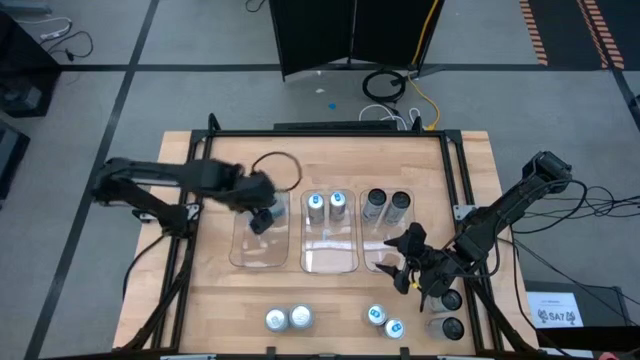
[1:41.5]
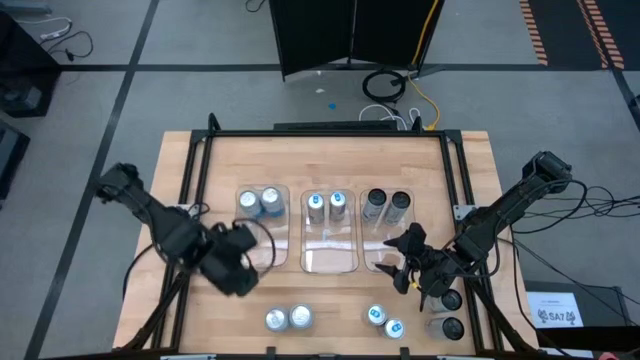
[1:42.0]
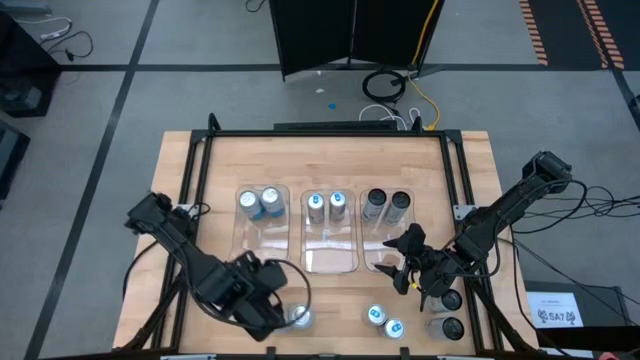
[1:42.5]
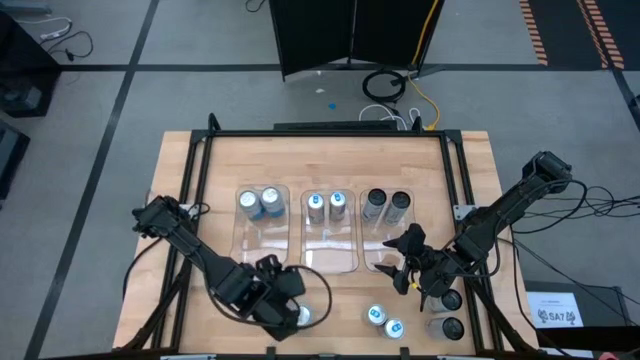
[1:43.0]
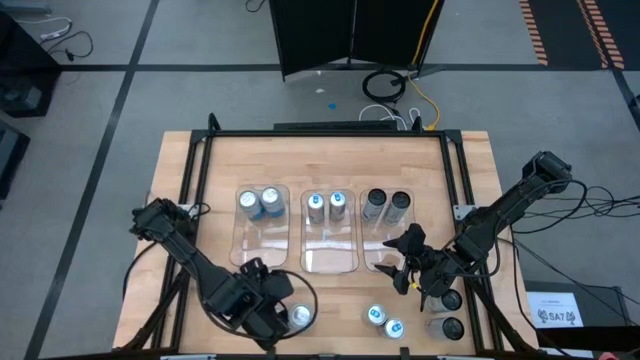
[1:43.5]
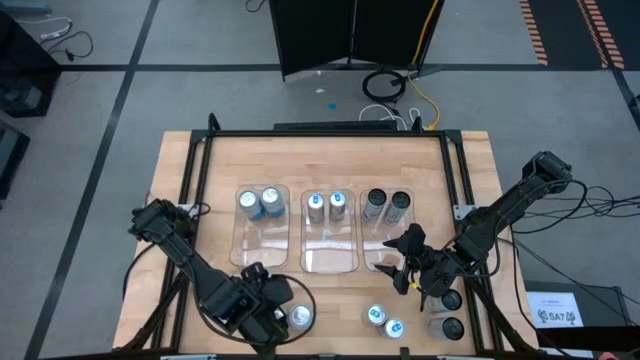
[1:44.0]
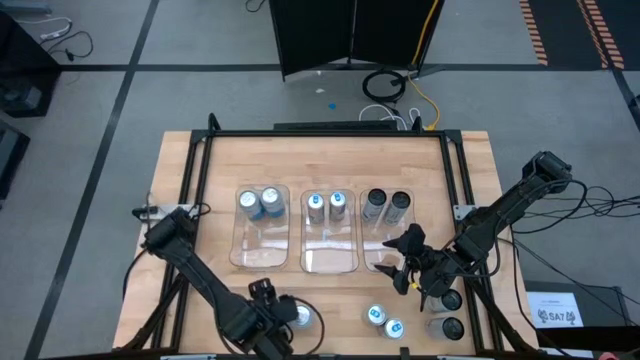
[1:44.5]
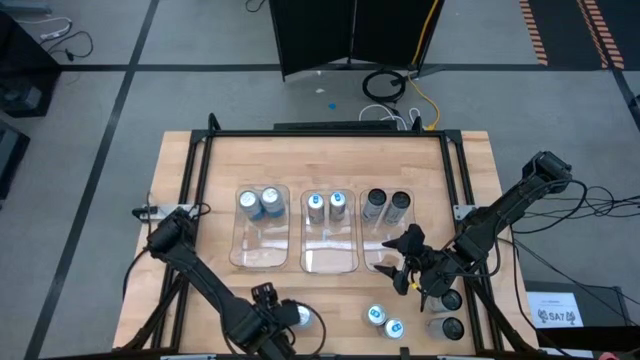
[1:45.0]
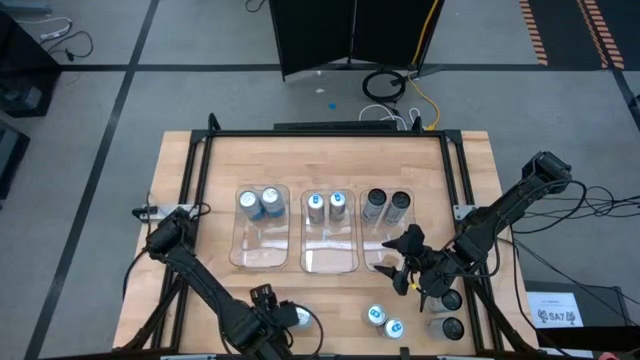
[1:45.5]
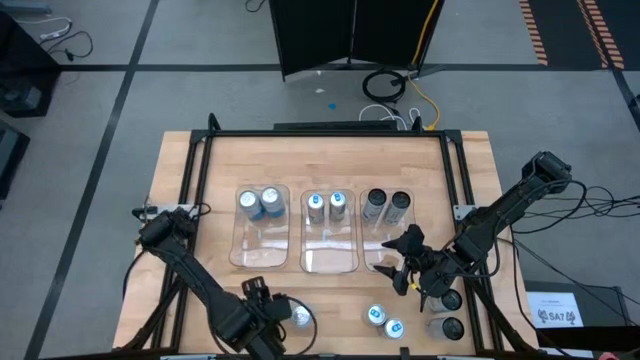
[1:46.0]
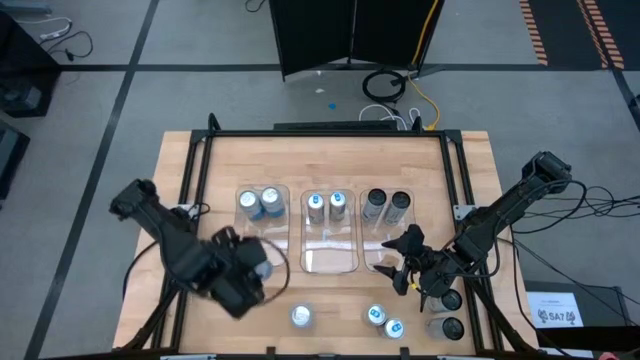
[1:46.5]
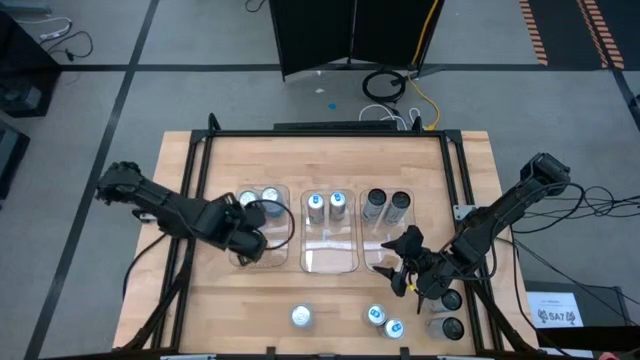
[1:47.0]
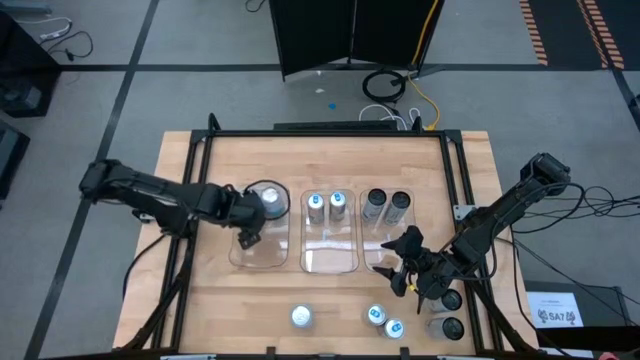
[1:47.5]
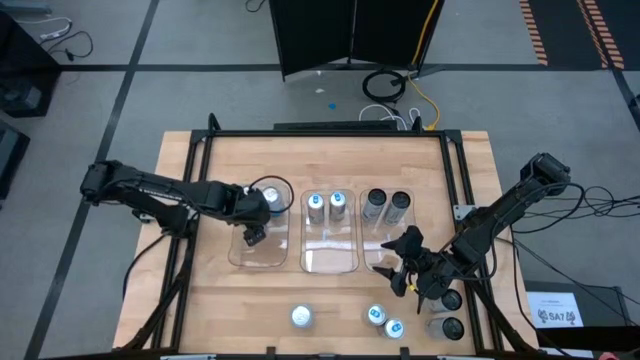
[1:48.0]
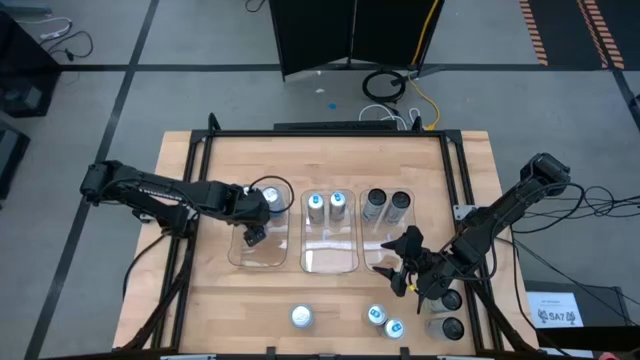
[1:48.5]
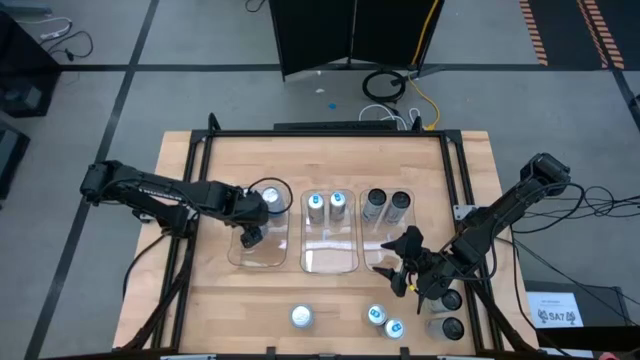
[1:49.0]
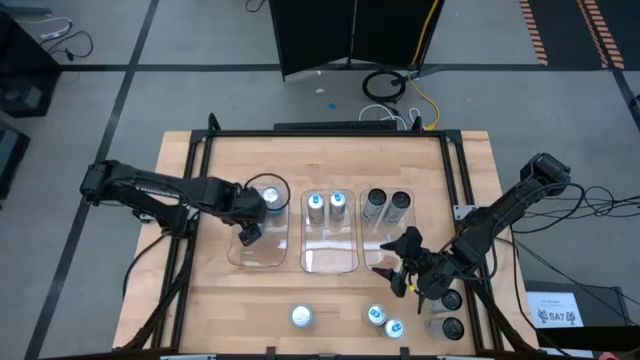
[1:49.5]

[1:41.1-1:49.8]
Task: Sort soda cans
Put the left blue-white soda can into the left transparent bin

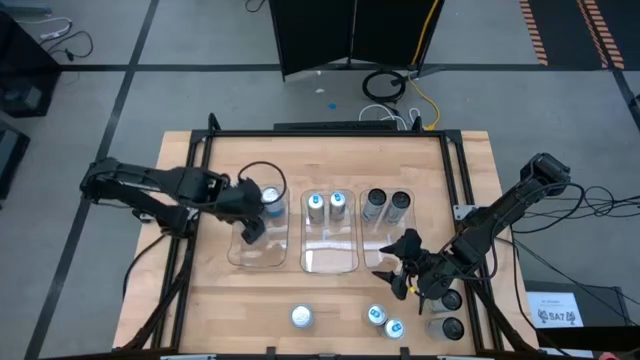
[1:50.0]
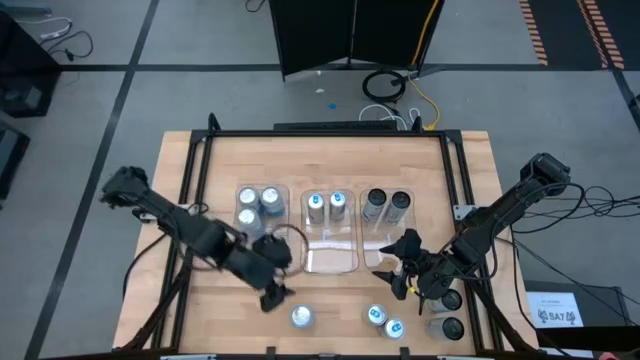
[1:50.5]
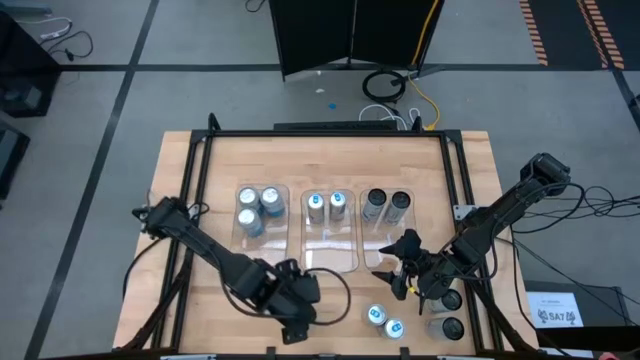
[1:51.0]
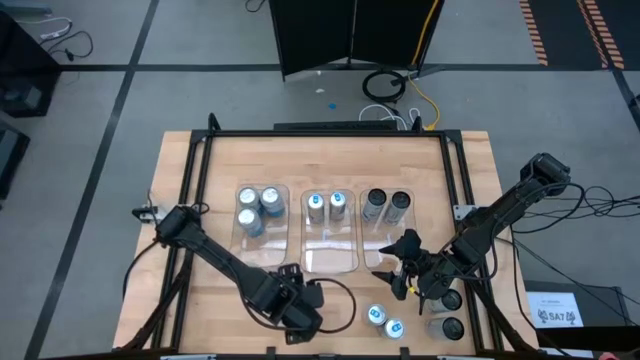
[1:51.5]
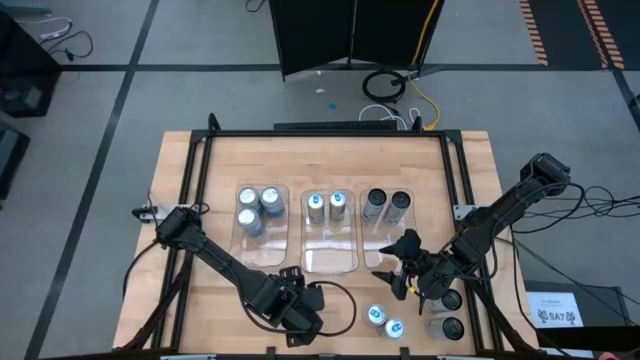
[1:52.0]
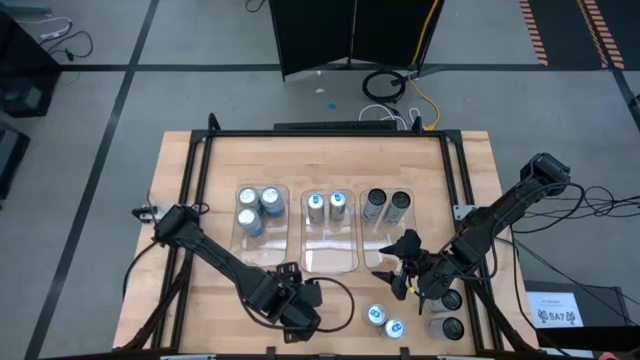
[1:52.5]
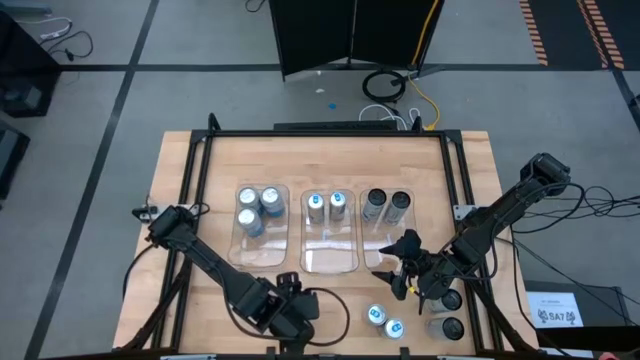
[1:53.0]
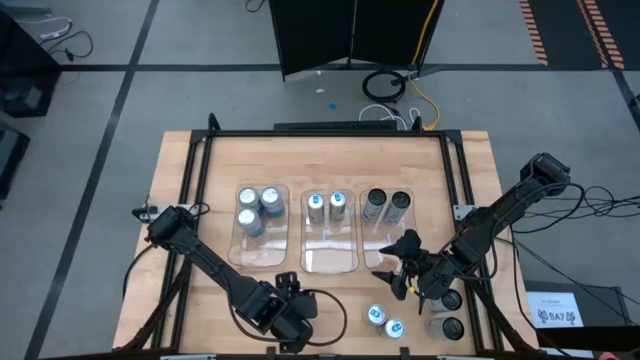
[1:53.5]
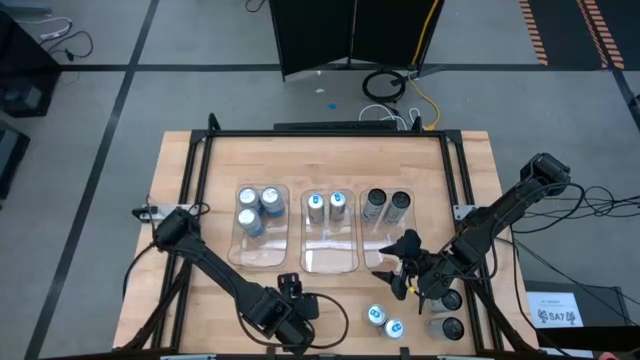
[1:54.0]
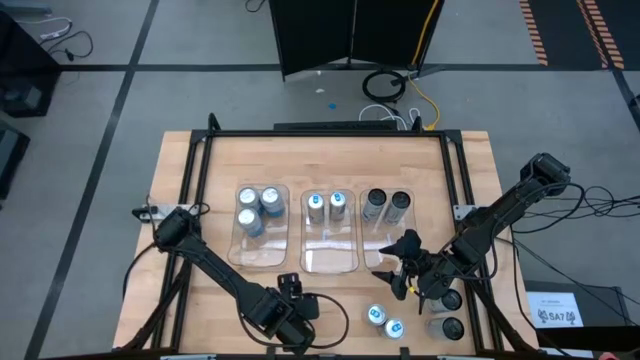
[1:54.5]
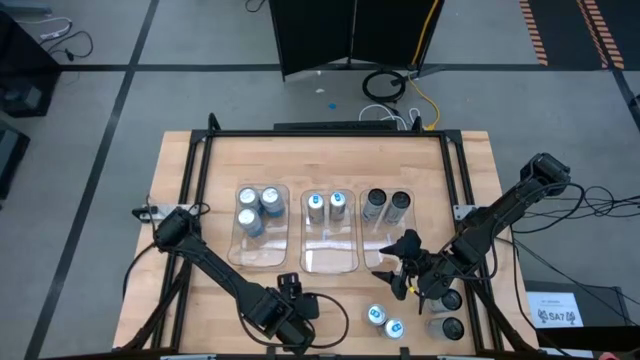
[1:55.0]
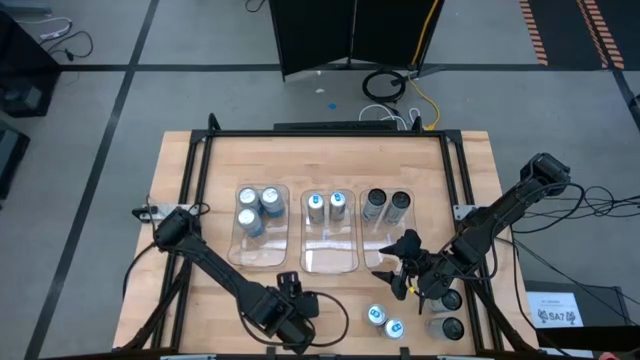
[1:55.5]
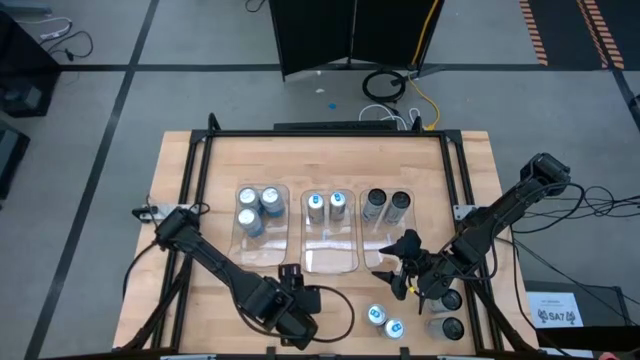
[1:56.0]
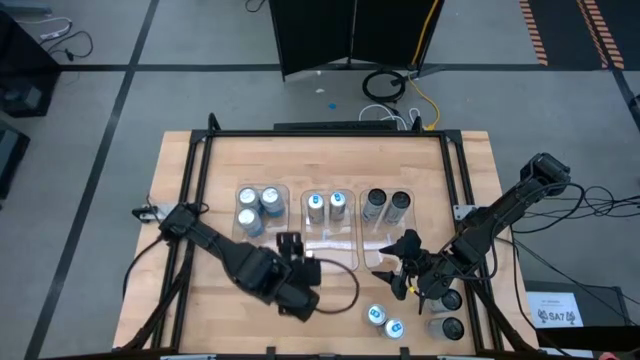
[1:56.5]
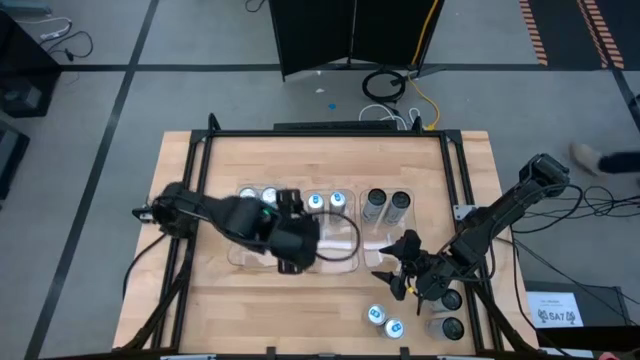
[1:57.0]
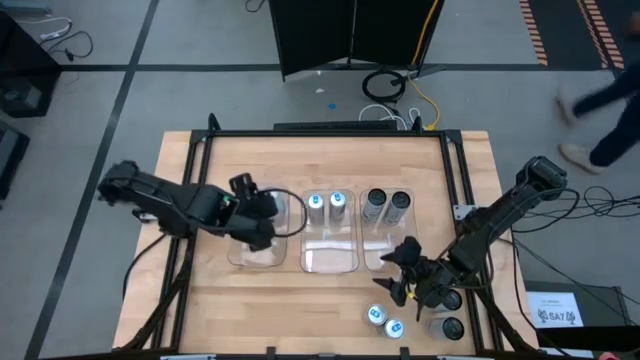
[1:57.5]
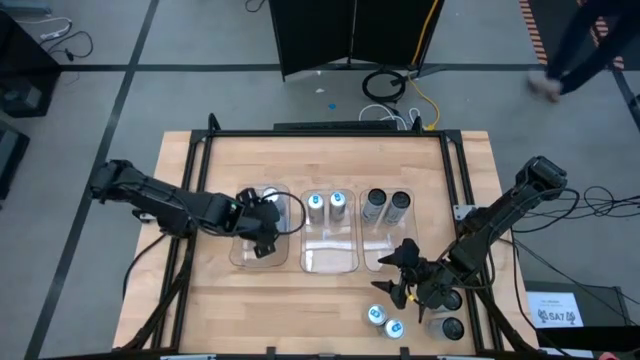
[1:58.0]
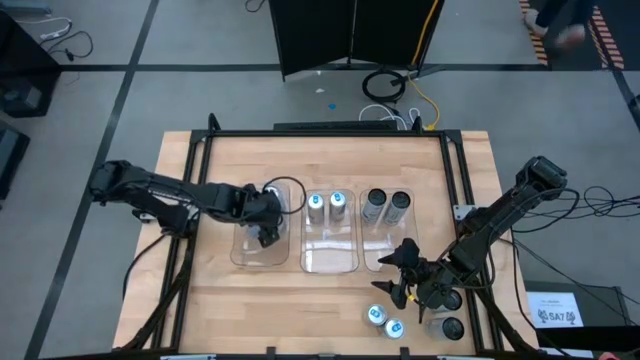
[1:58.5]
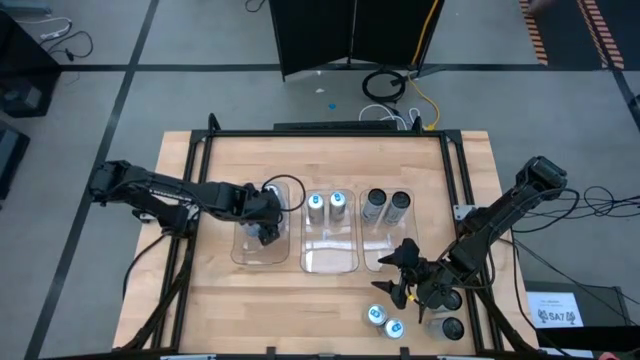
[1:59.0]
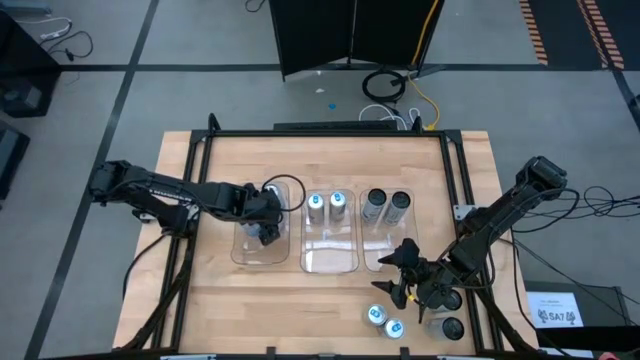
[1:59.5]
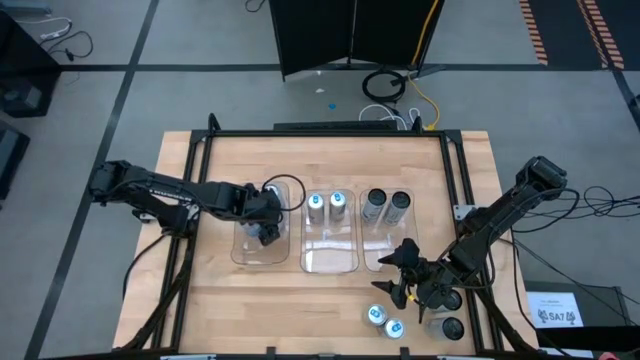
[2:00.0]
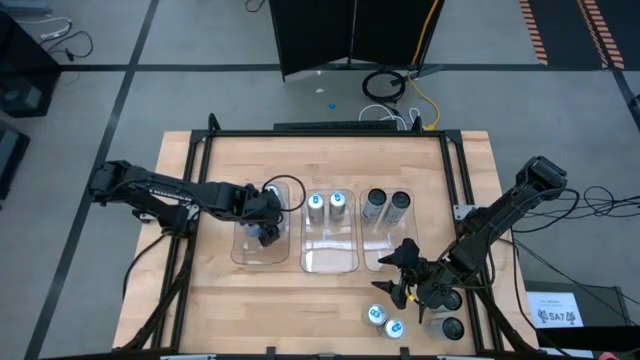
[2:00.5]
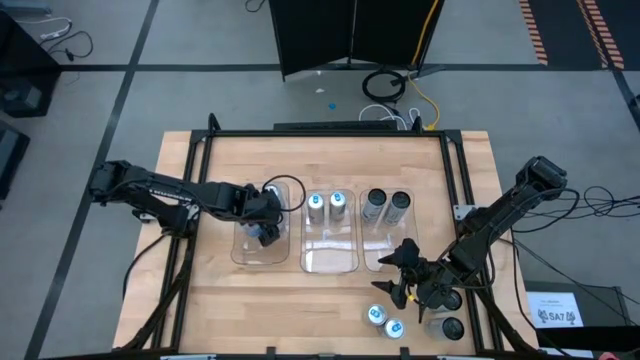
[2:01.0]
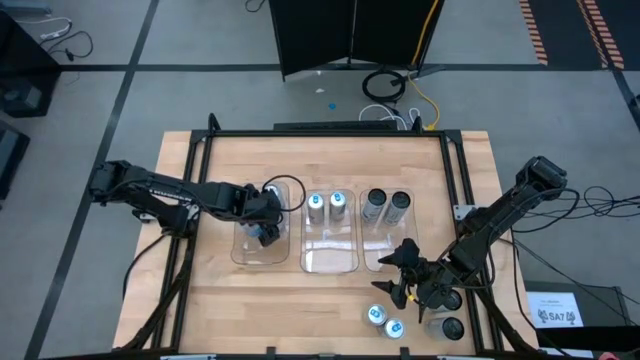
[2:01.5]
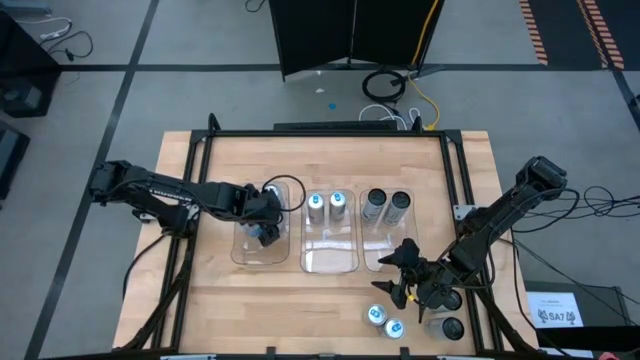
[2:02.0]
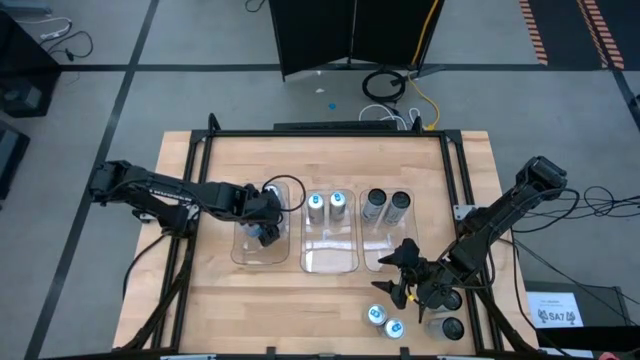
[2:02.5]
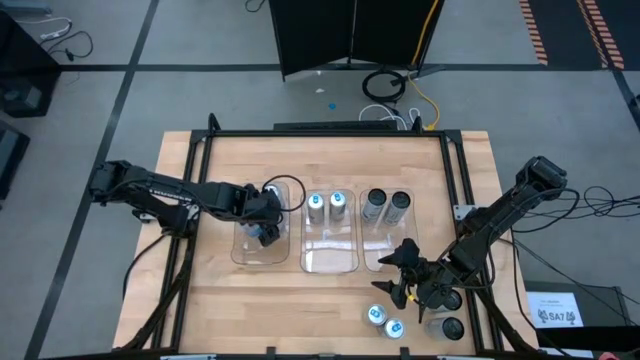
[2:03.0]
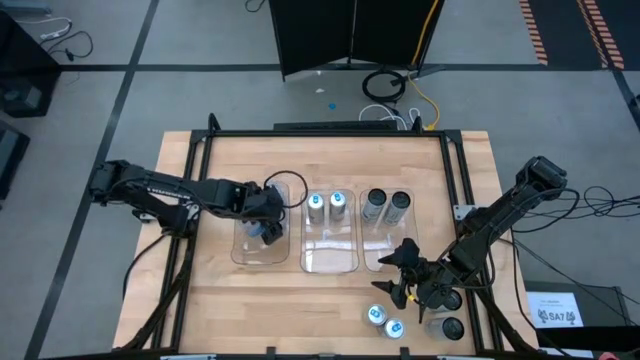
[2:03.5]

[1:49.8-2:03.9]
Put the blue-white soda can into the left transparent bin
